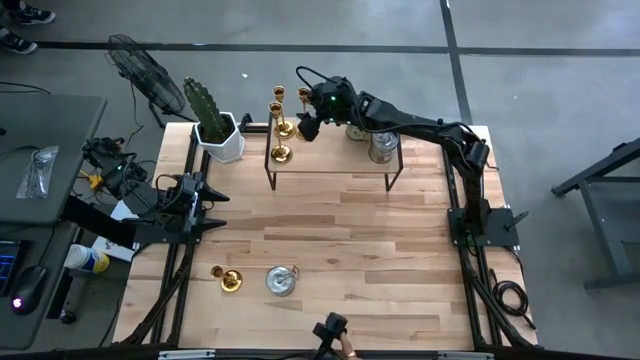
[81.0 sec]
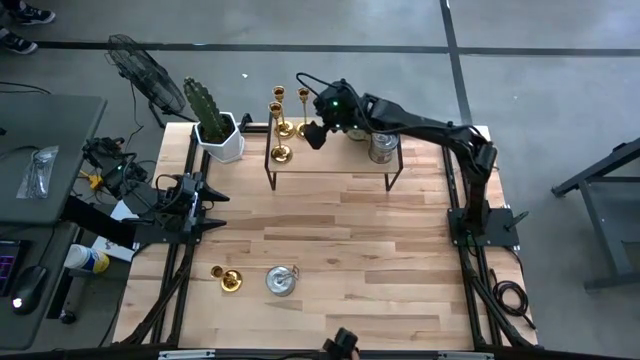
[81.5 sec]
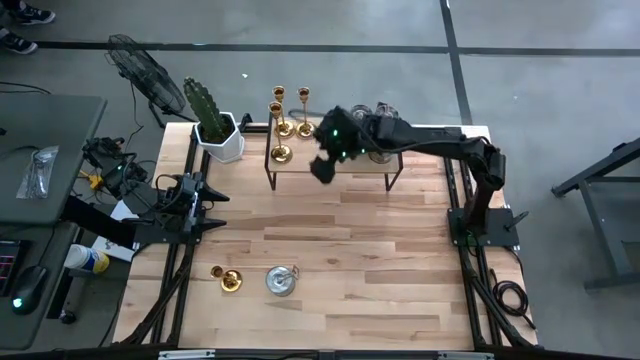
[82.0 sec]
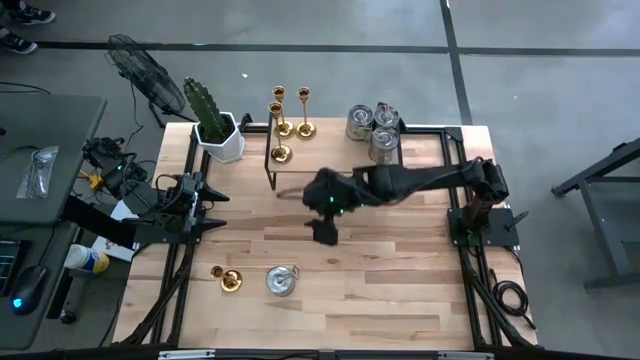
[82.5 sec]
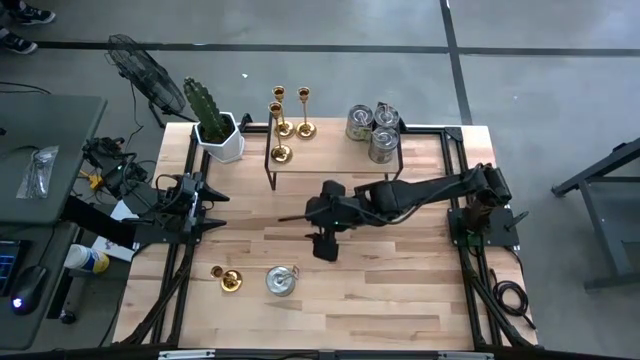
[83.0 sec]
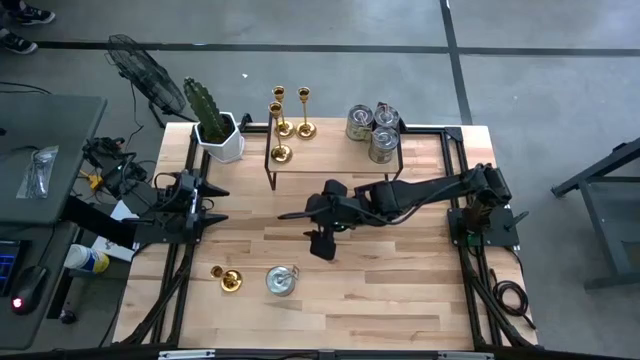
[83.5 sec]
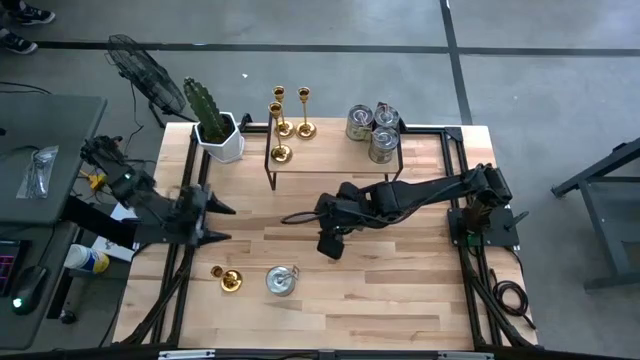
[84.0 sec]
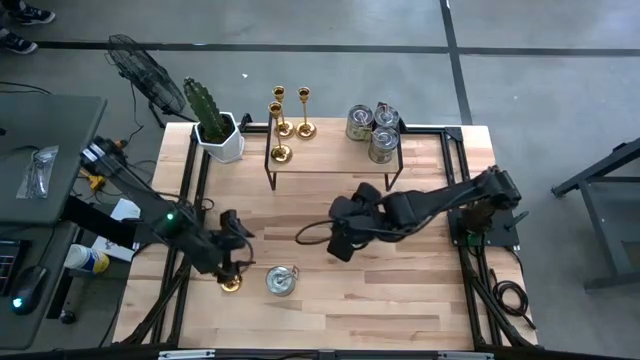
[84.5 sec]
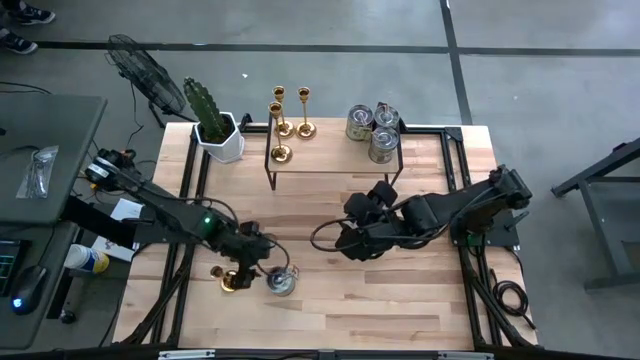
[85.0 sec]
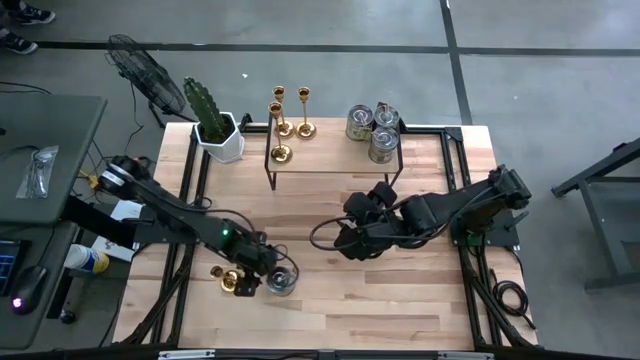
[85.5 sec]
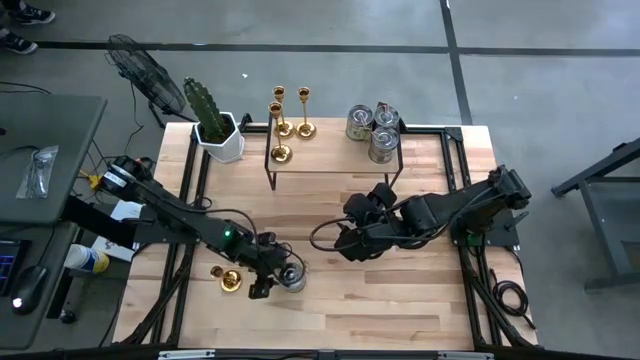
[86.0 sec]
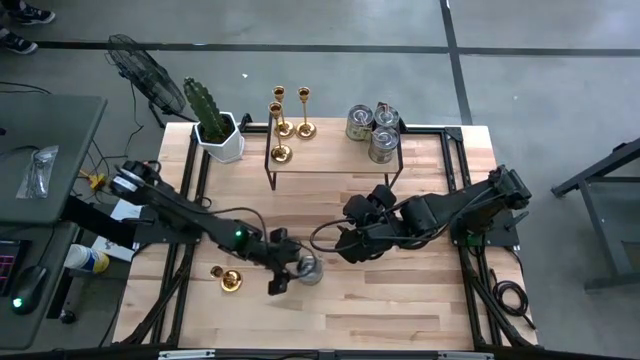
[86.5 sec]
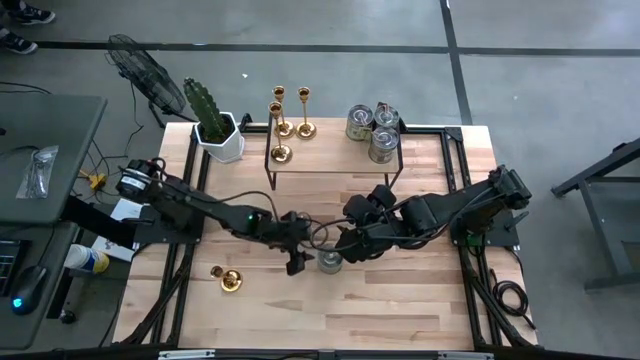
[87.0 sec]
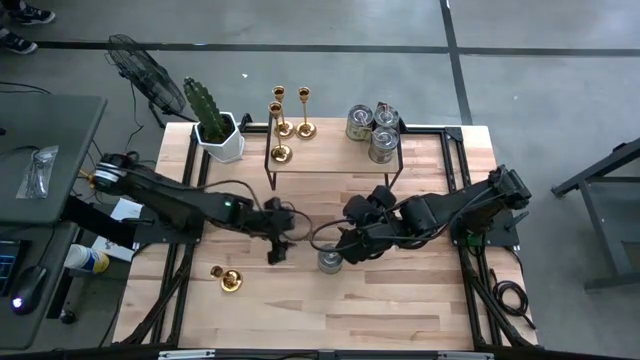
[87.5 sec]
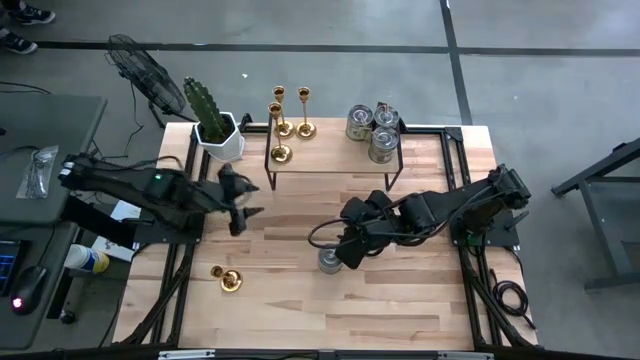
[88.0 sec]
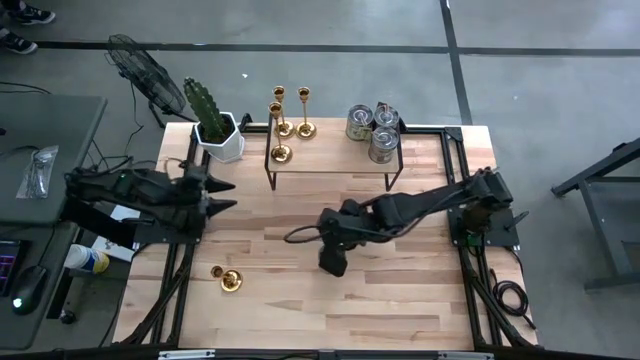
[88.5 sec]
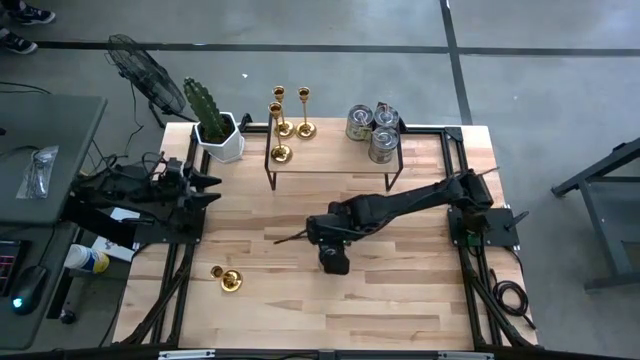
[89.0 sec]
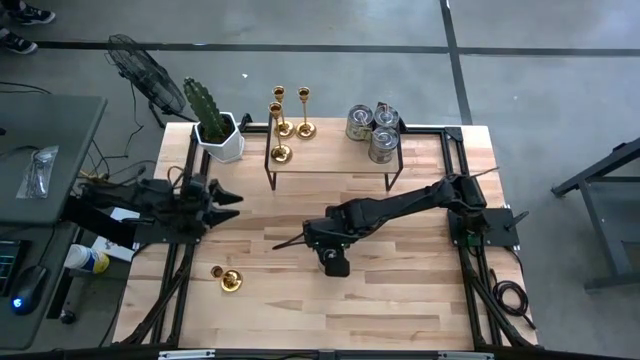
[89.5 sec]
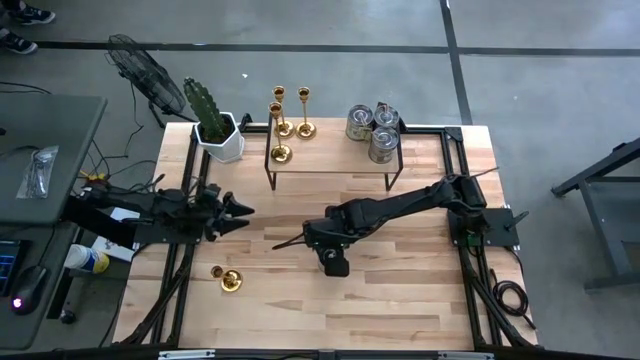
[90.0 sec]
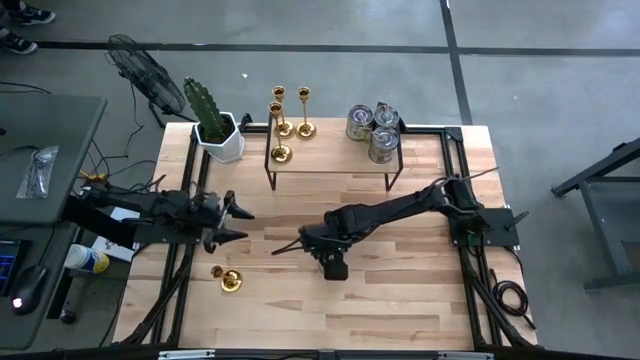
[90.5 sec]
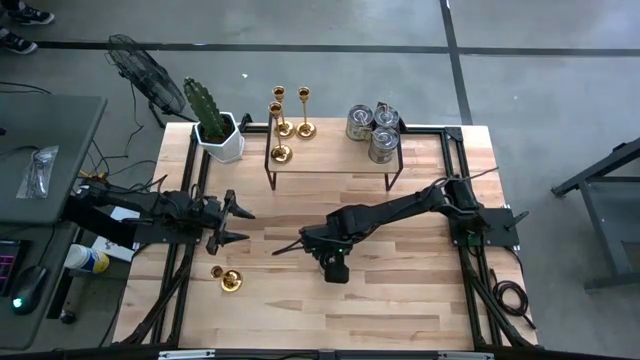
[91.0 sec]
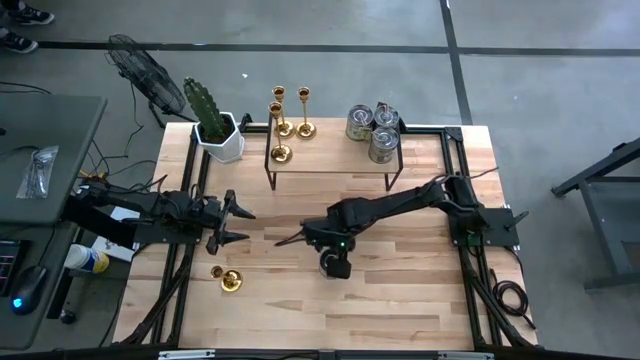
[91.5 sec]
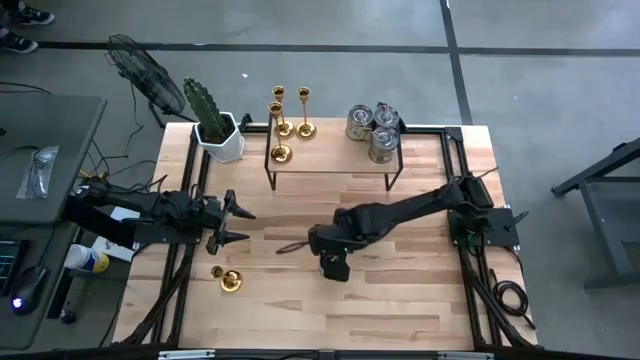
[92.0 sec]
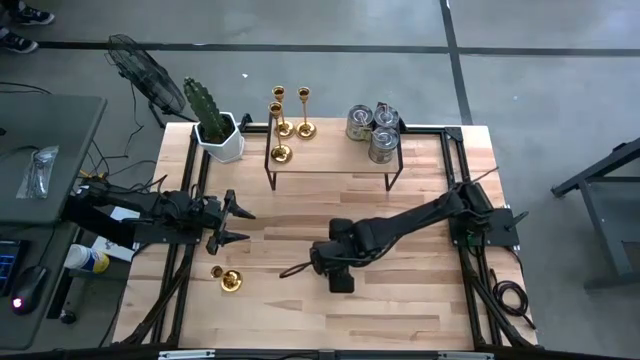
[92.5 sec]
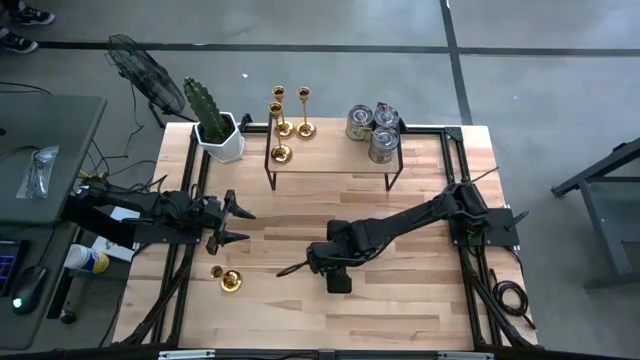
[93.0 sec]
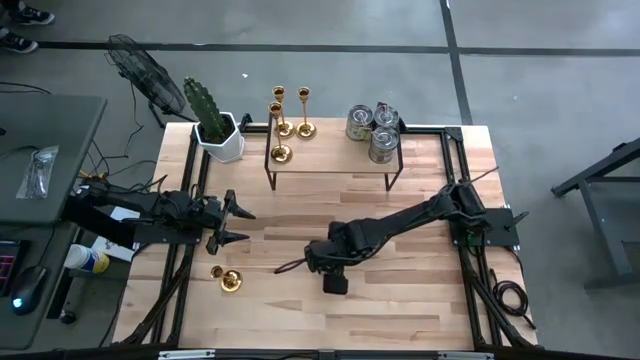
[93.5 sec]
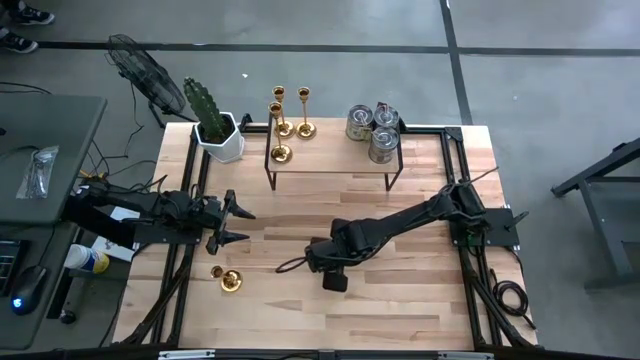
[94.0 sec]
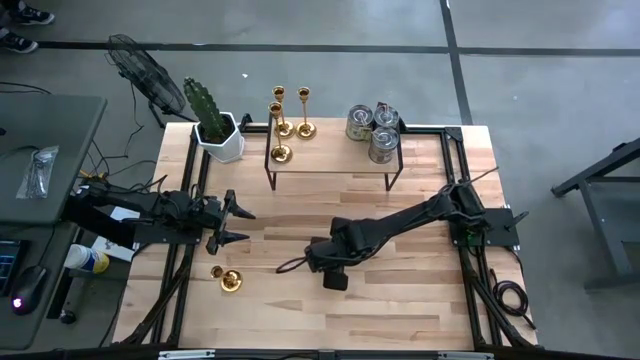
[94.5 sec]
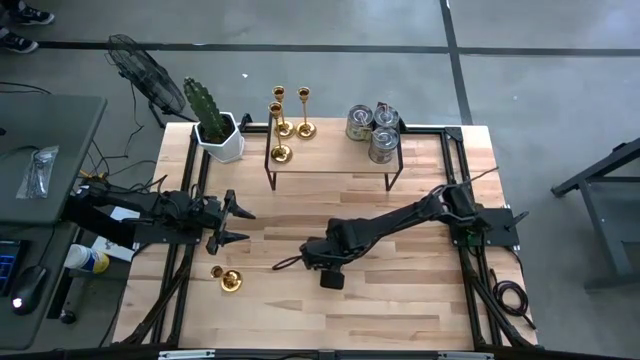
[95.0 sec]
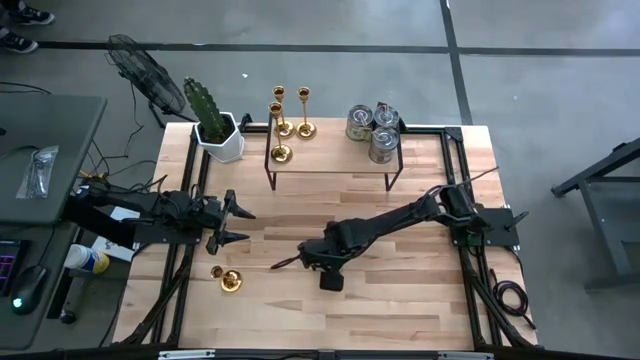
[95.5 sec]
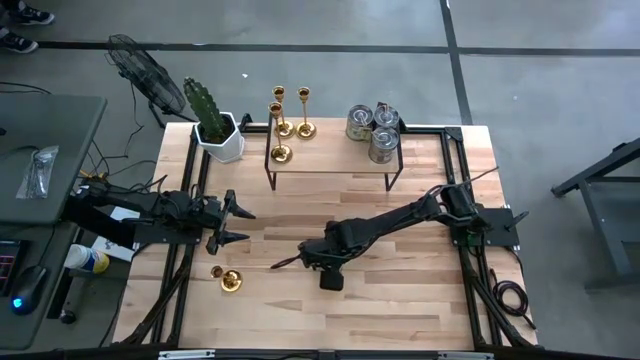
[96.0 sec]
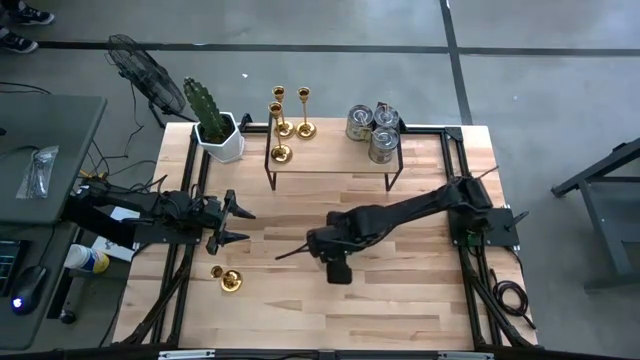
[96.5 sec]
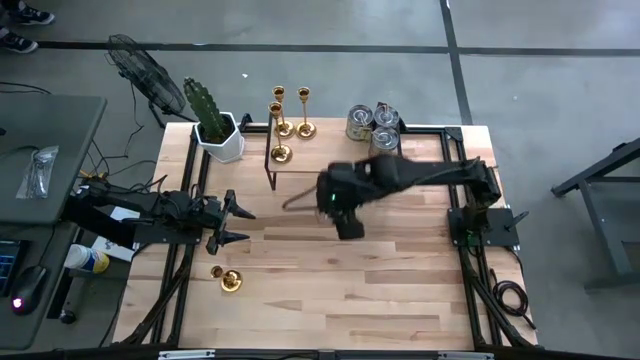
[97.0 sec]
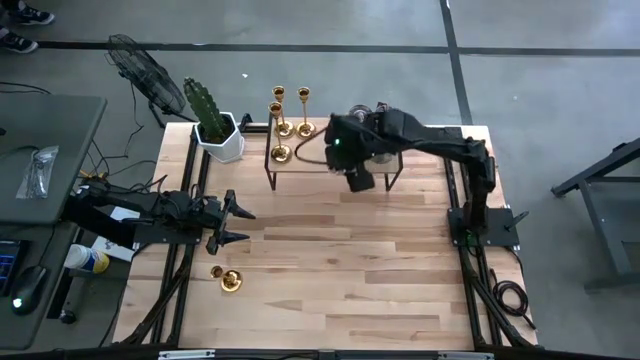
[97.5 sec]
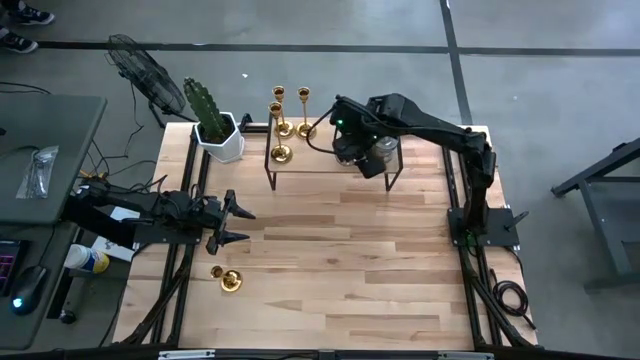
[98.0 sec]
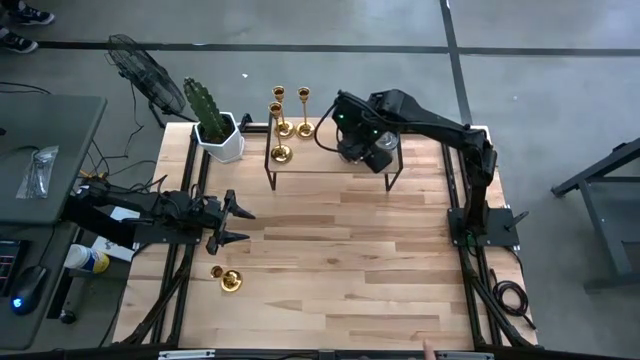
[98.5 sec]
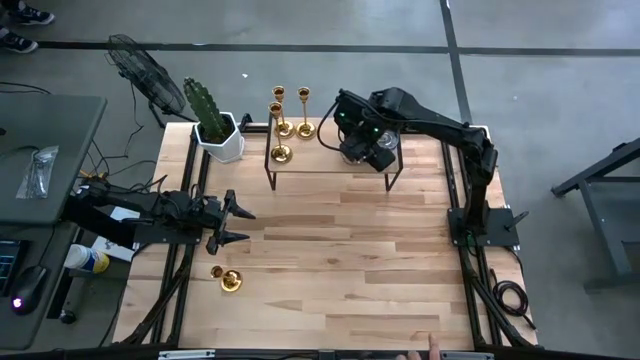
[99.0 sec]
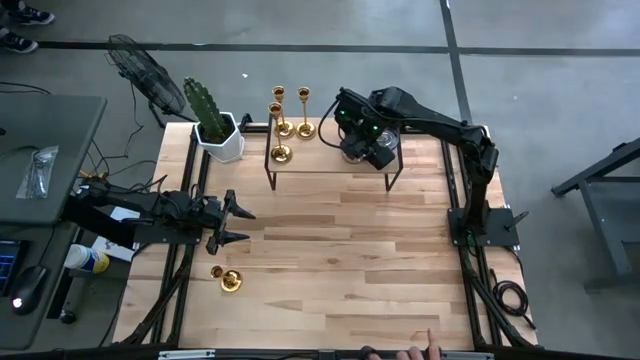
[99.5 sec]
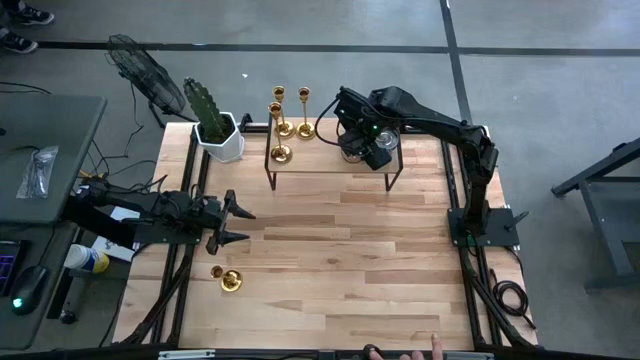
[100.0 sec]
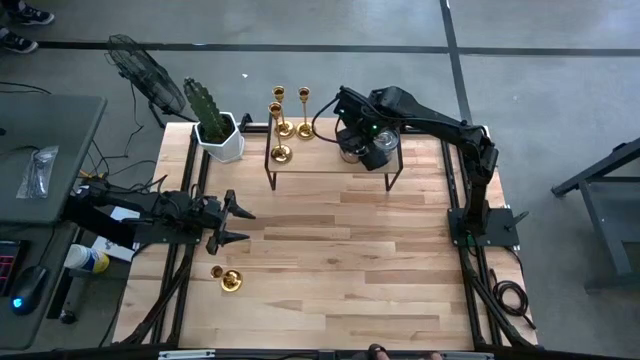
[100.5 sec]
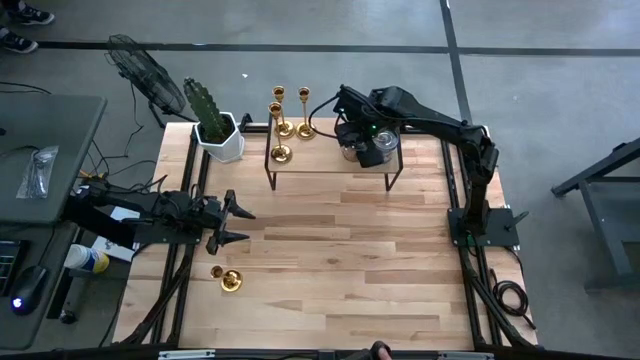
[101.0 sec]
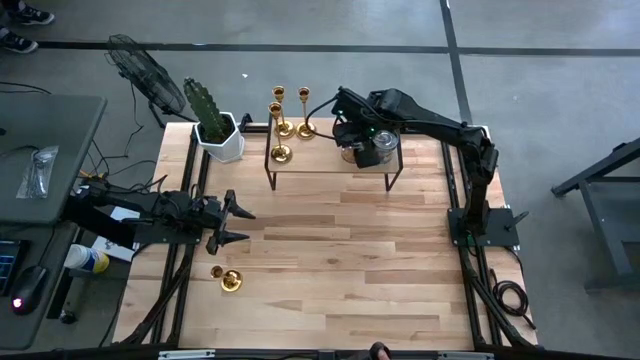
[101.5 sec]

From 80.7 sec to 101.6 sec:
Task: Pick & Place candle stick holders
Align the silver scented candle with the other silver scented candle on the shelf
